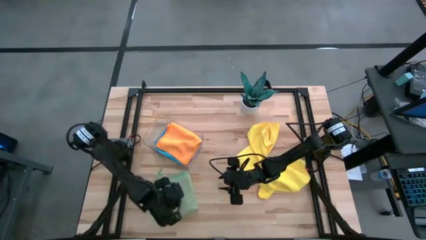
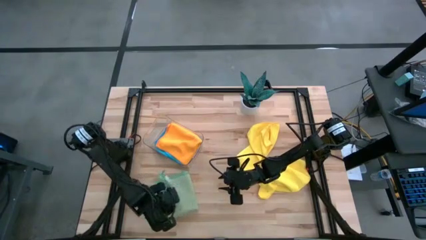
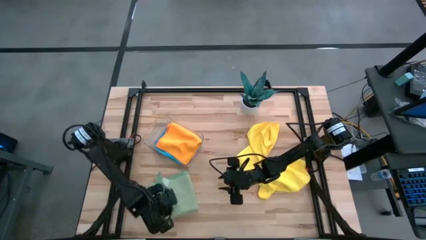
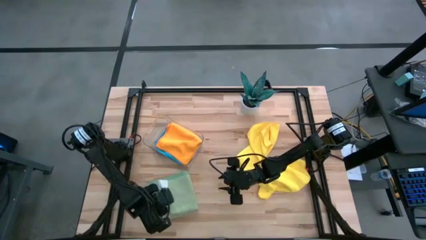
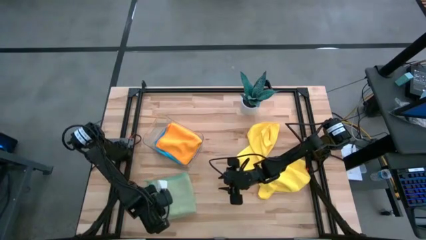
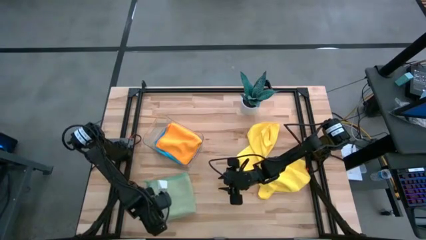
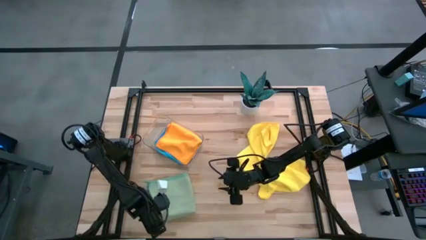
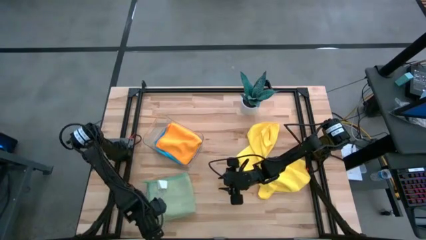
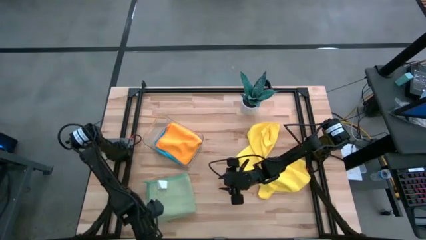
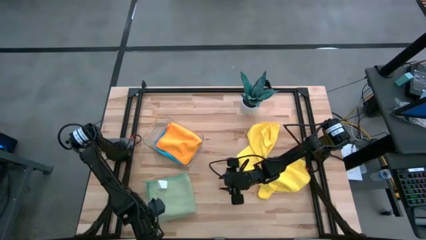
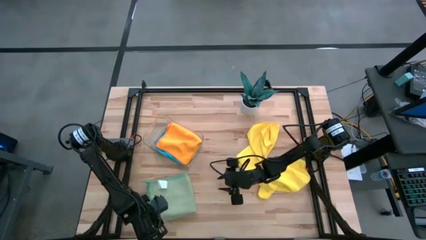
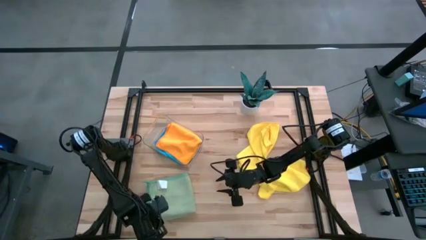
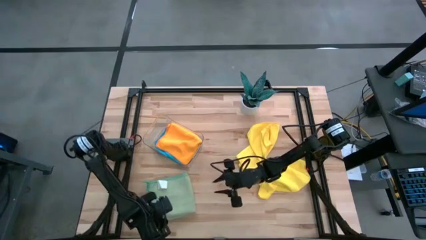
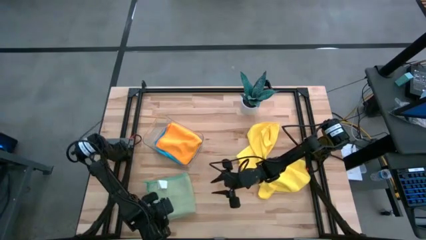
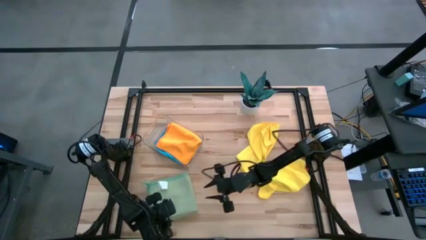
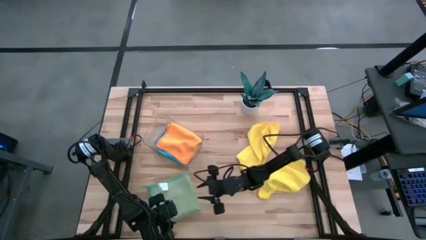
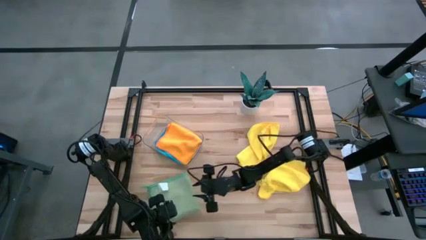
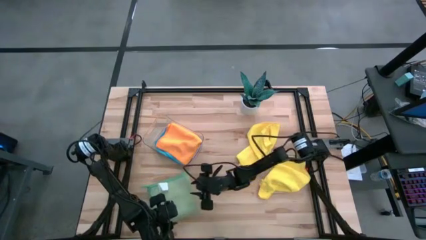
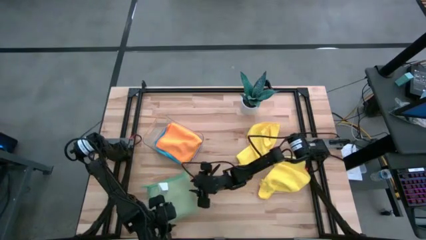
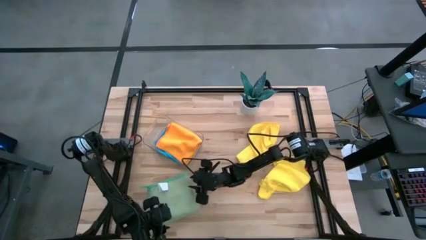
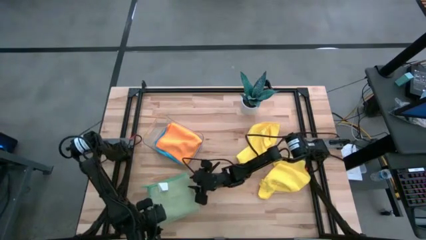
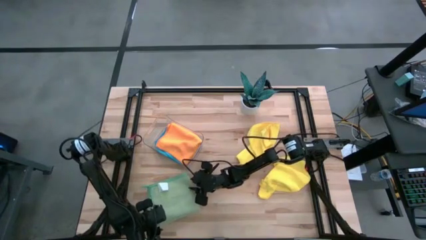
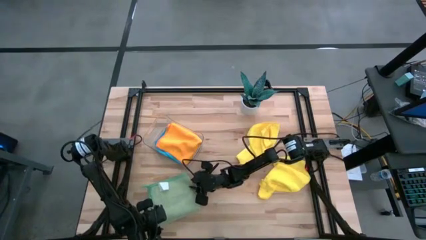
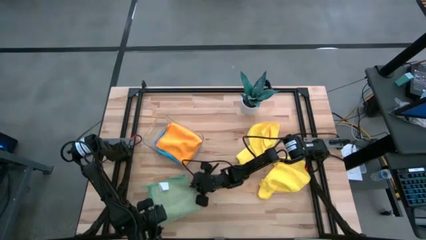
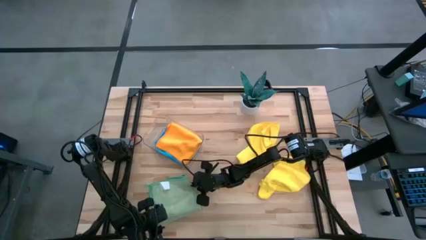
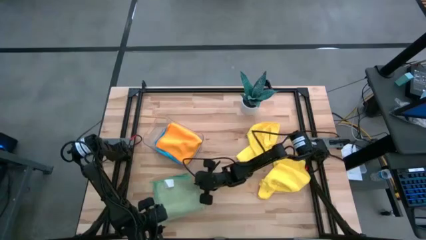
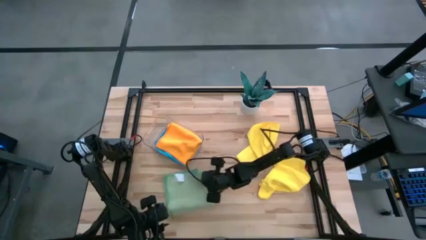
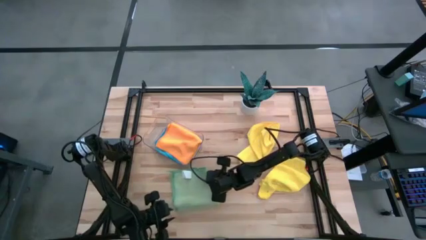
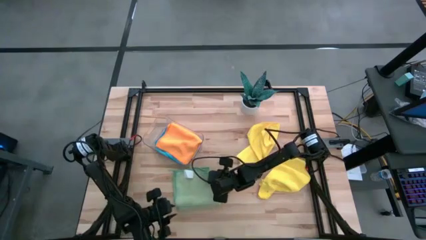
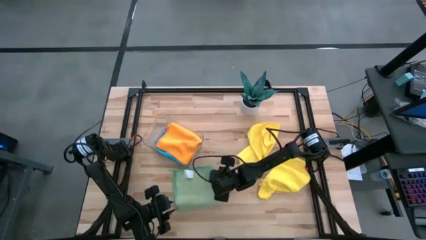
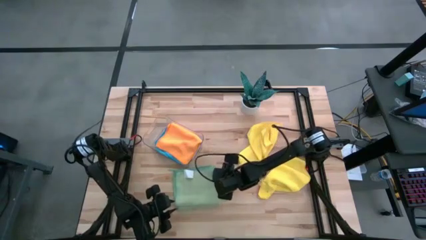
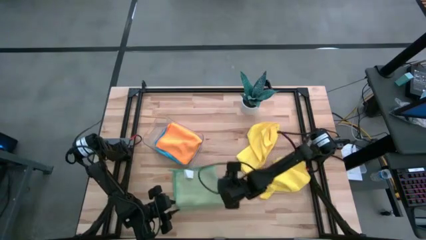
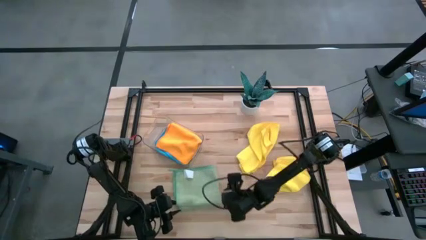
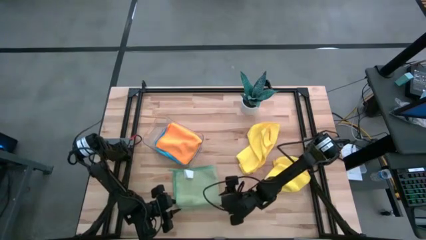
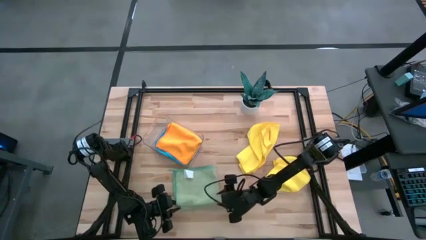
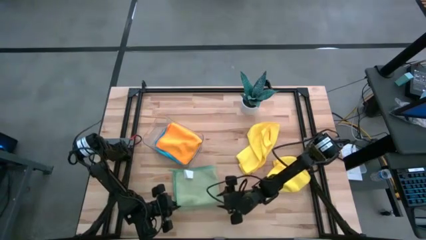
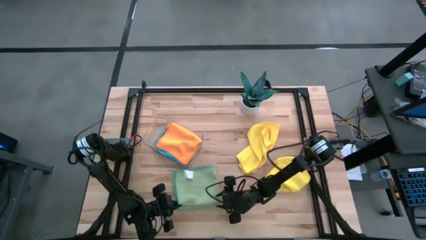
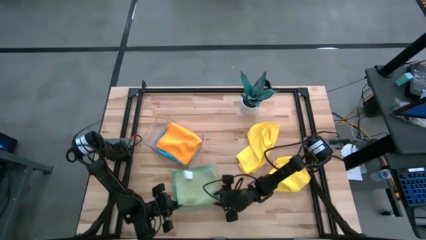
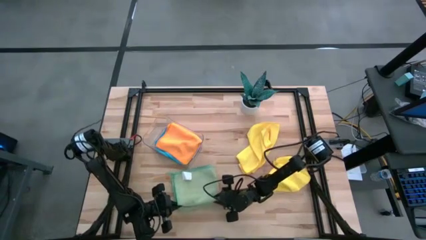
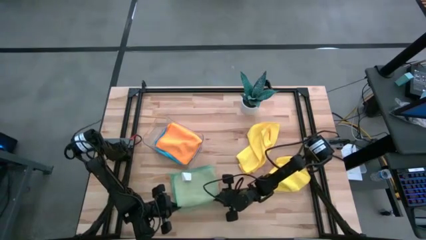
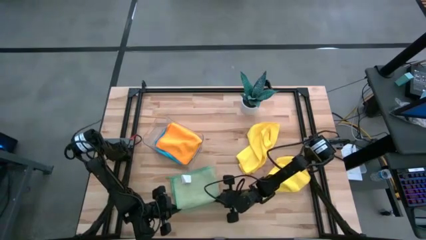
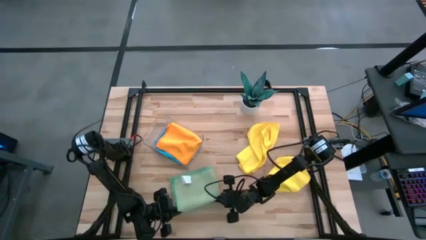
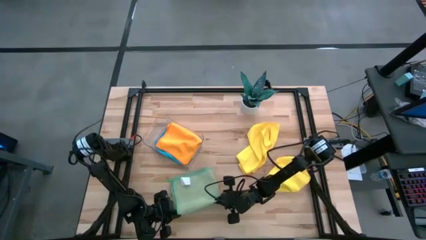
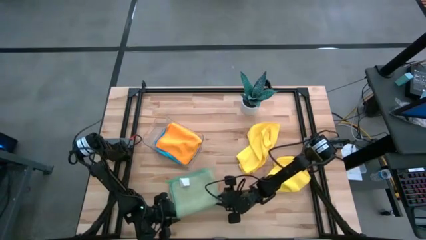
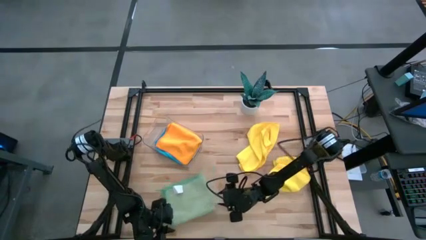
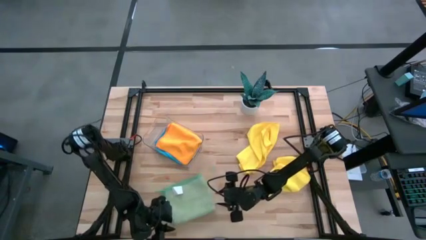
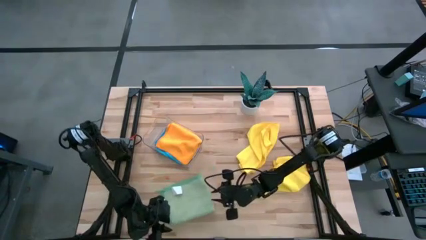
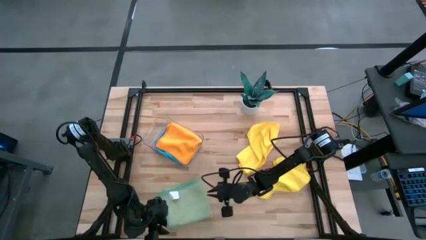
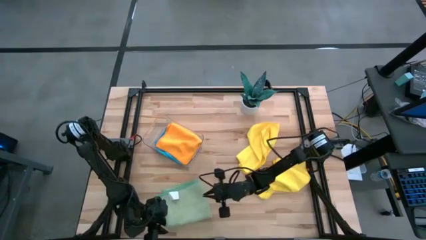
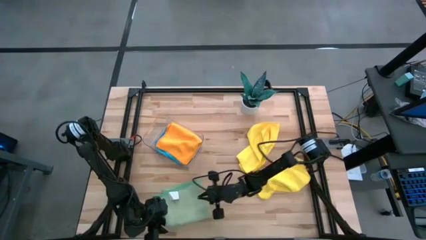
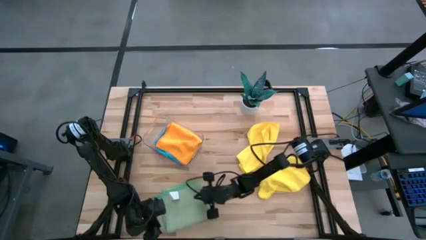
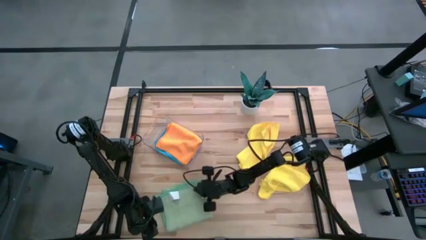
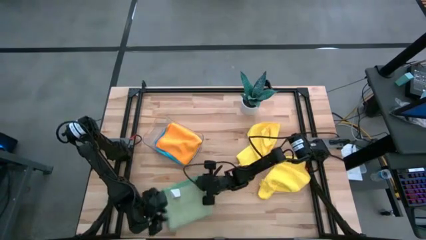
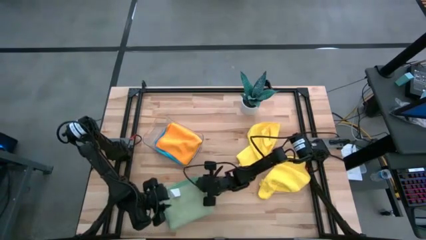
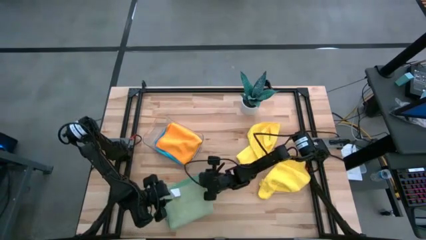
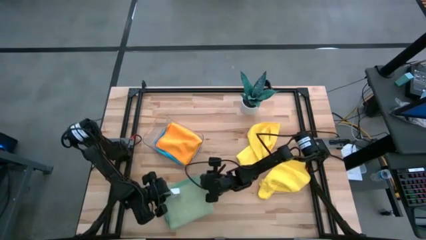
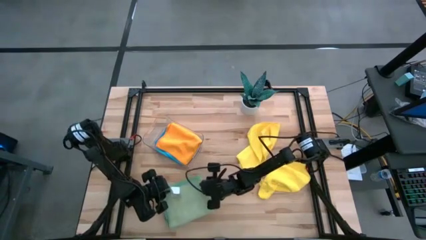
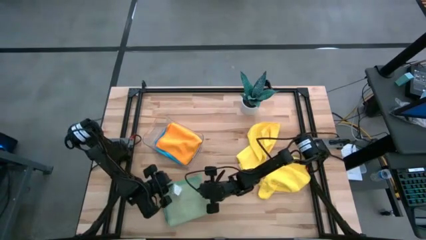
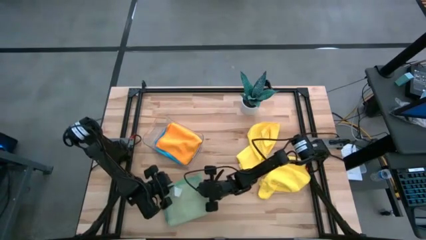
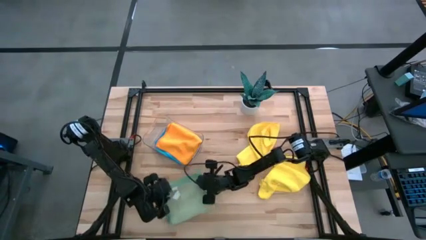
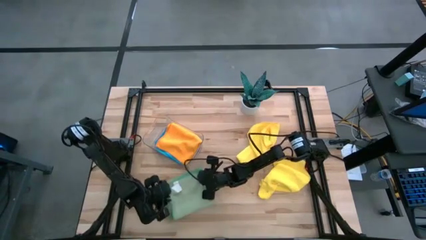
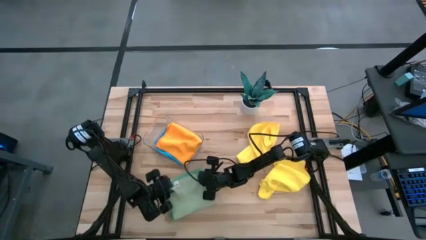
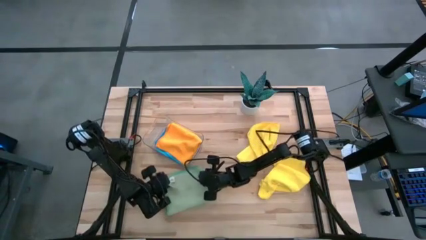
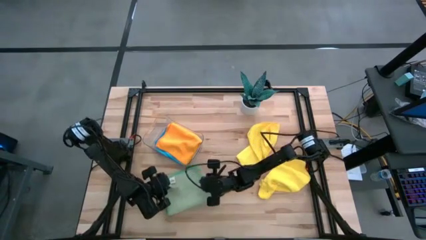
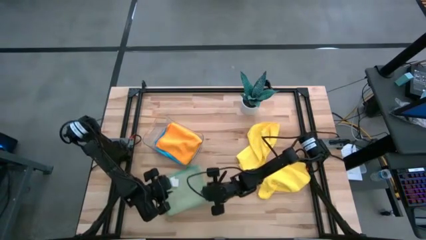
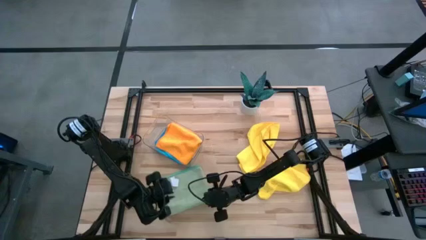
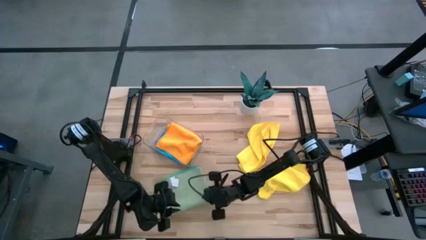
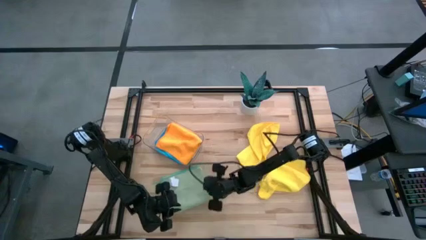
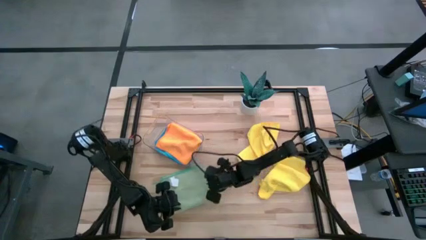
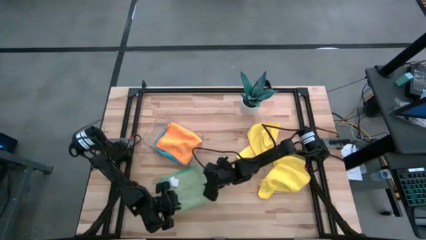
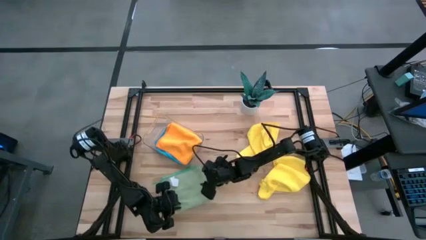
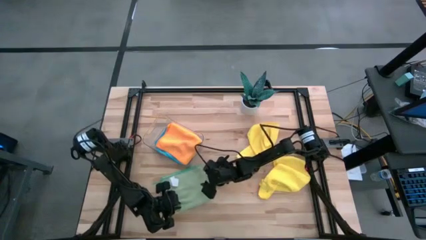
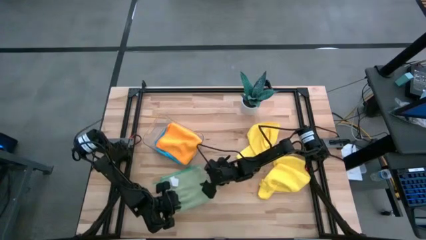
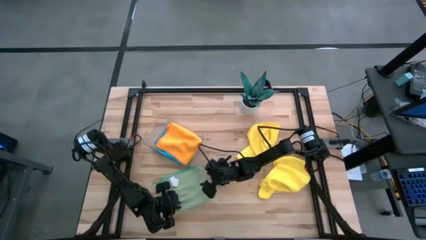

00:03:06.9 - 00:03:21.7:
Task: Fold microfiber towels
Fold the green microfiber cloth
